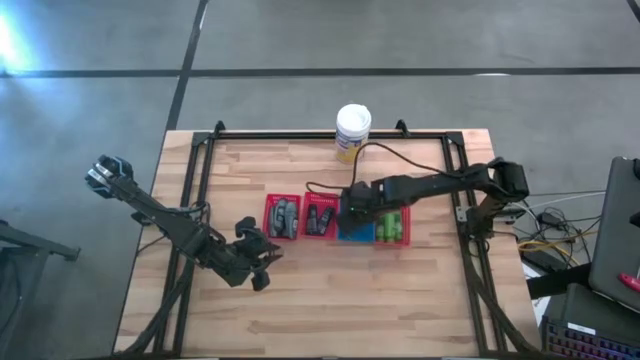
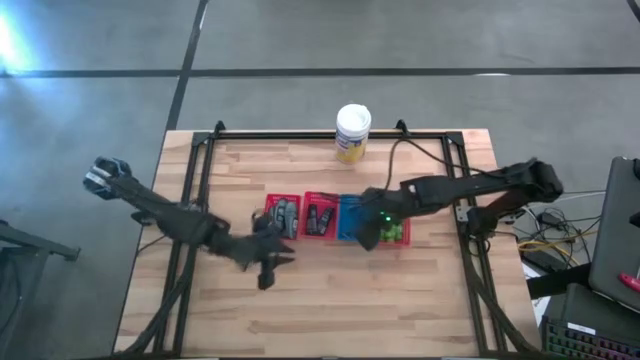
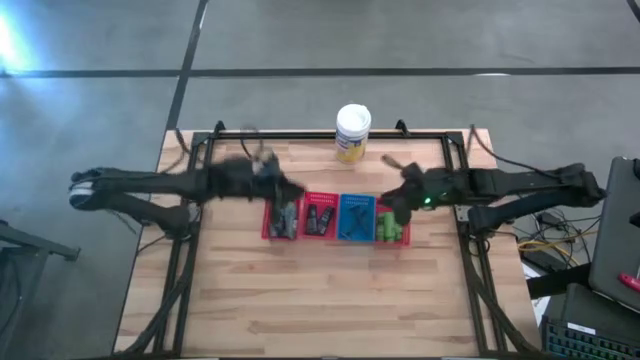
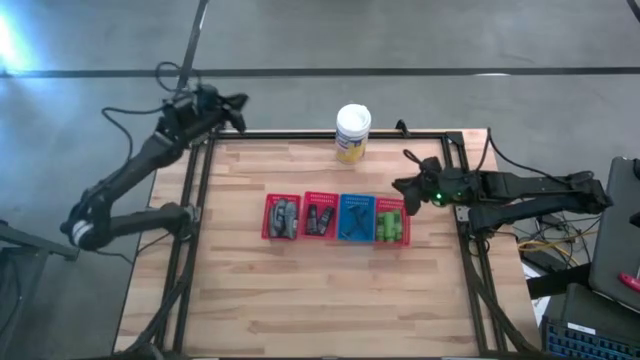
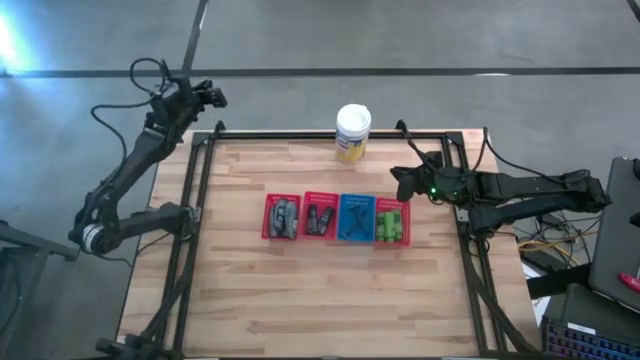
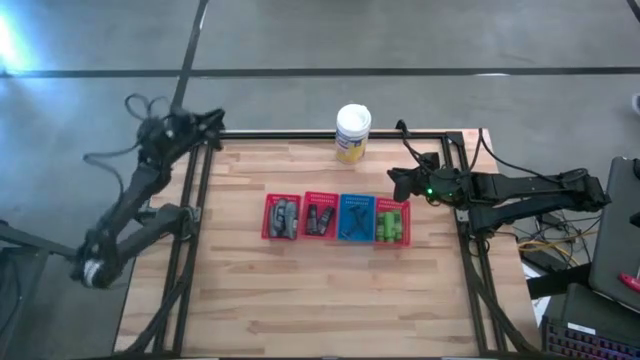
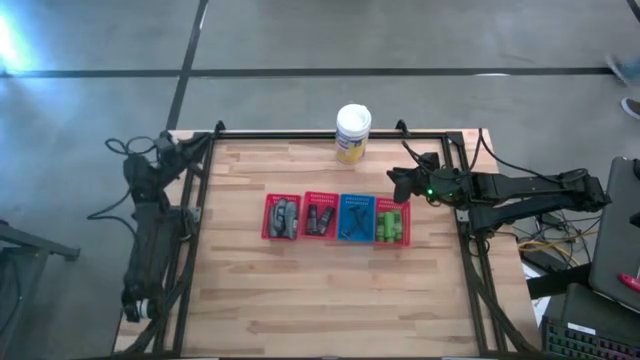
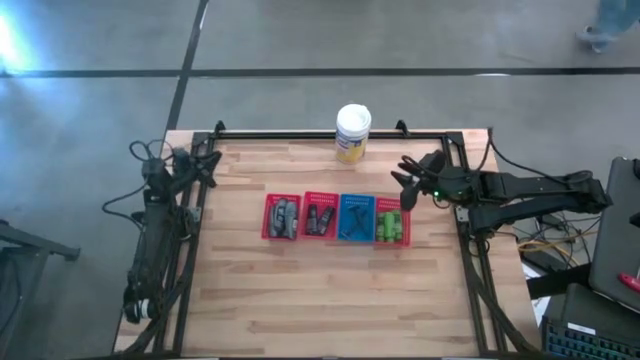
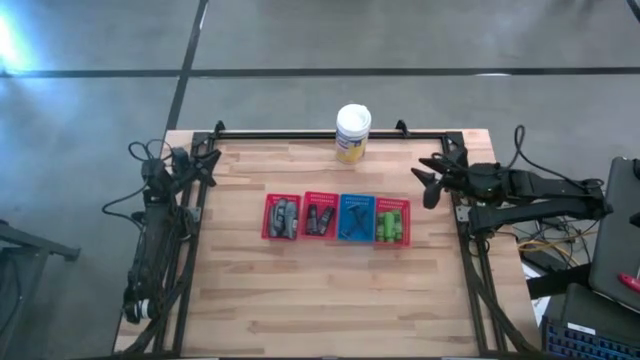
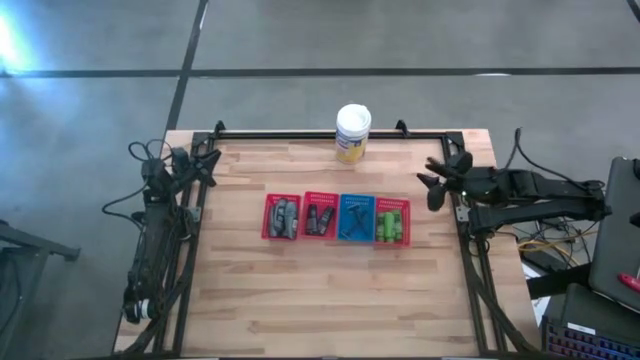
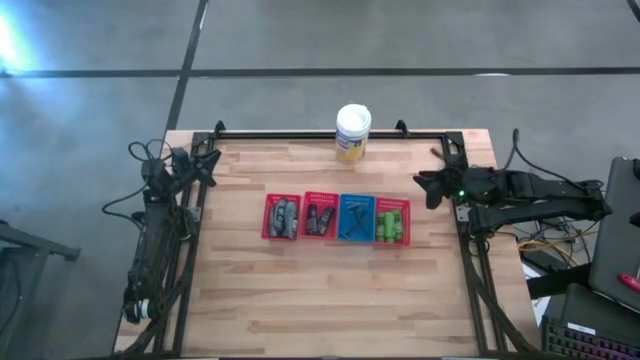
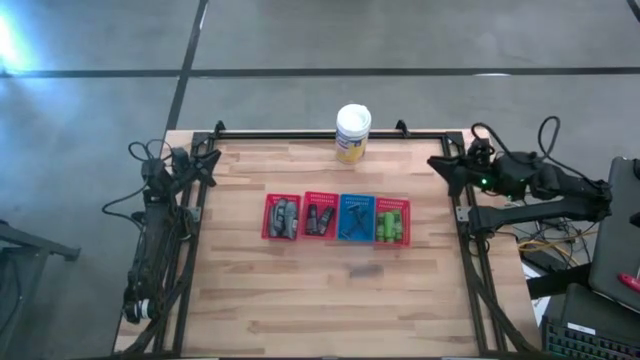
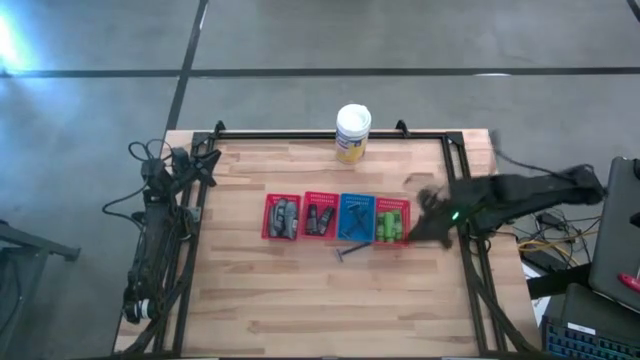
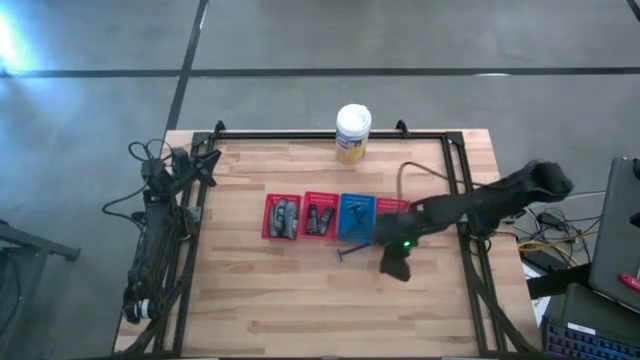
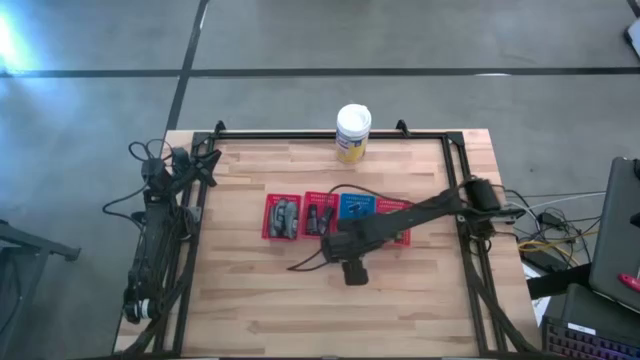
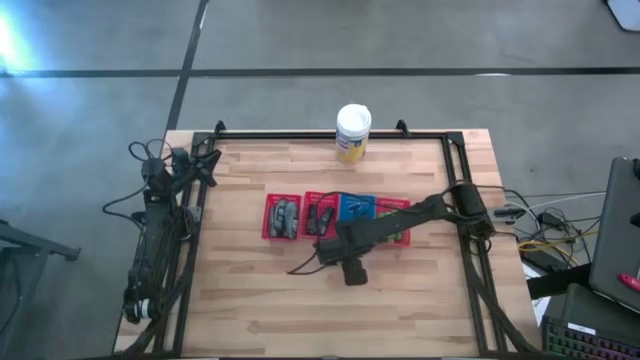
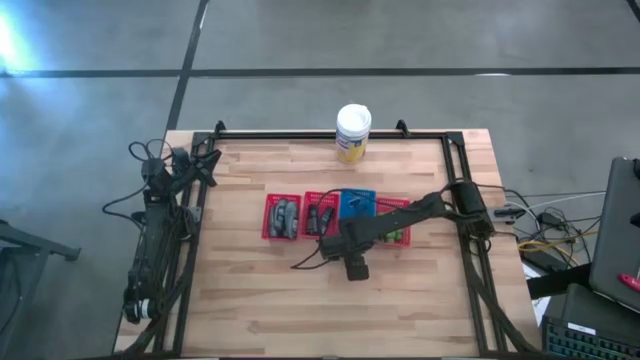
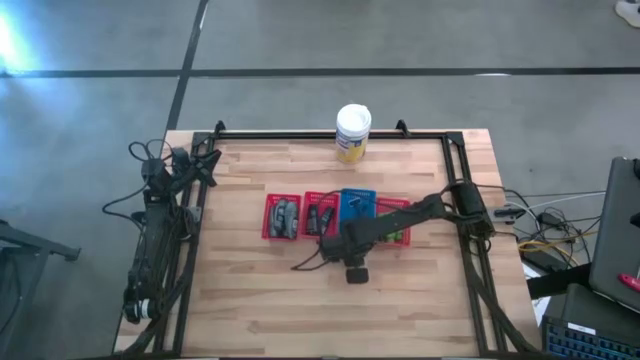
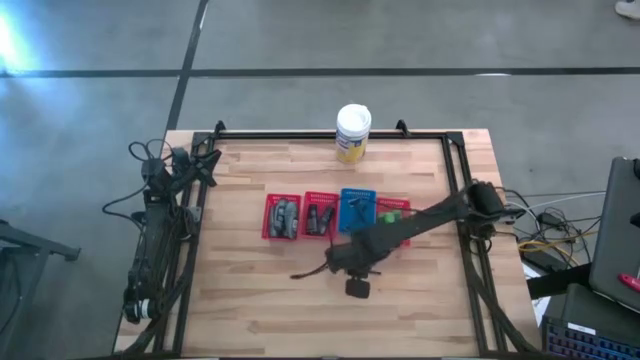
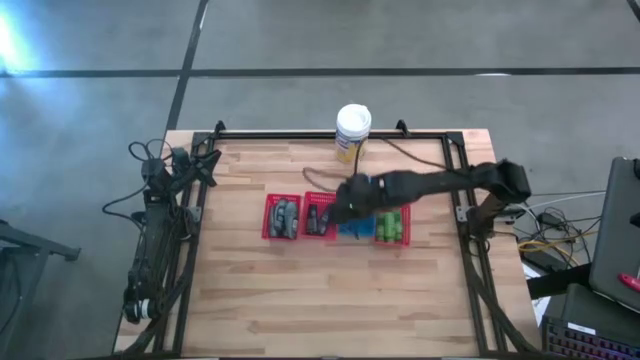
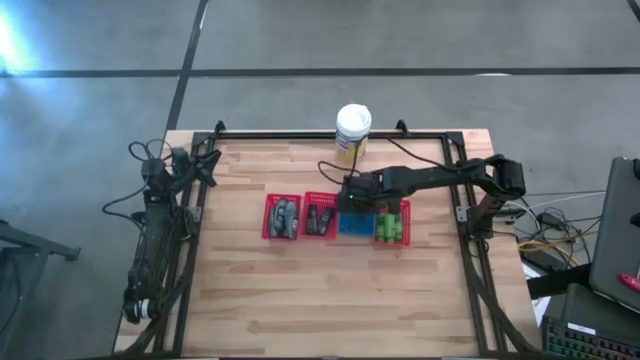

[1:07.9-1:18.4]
Task: Pick & Place Travel size toiletries
Put the blue razor into the blue bin

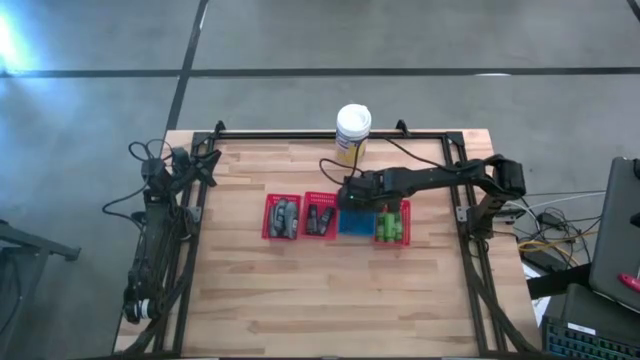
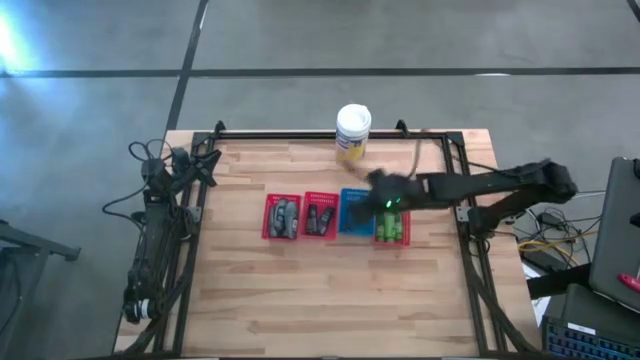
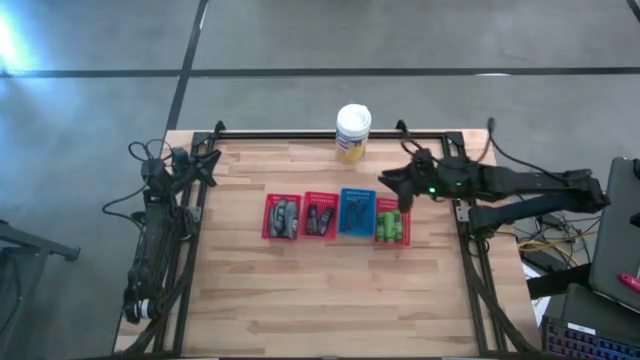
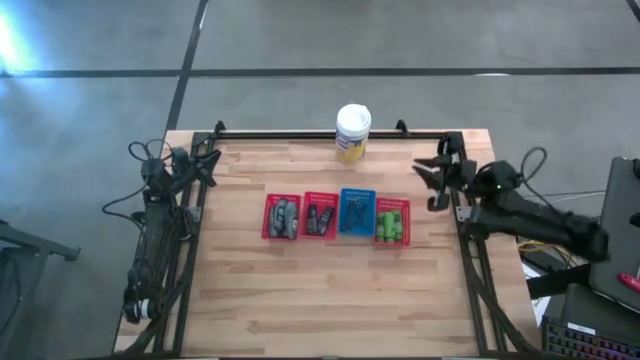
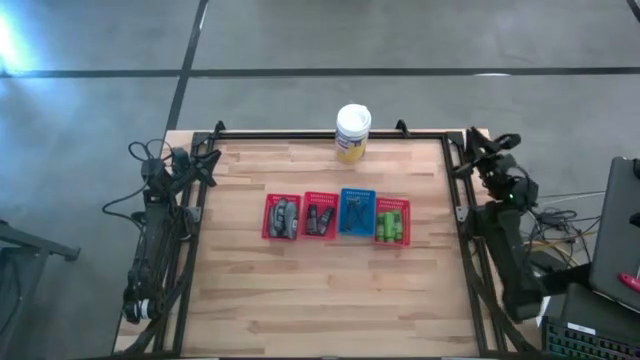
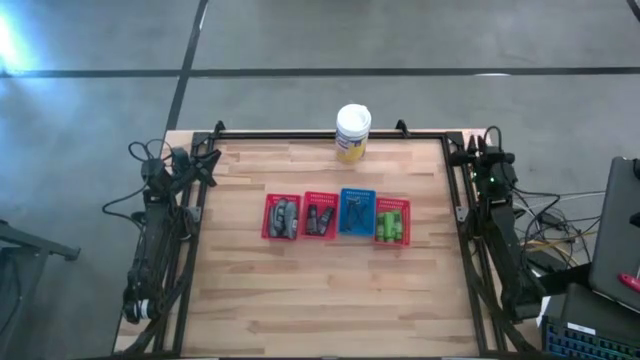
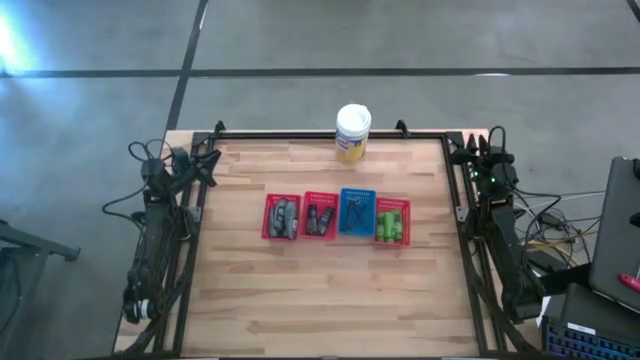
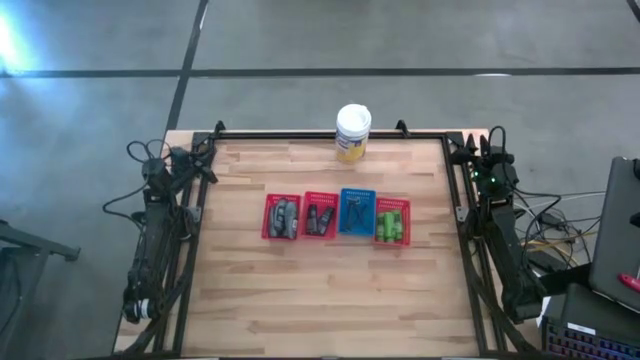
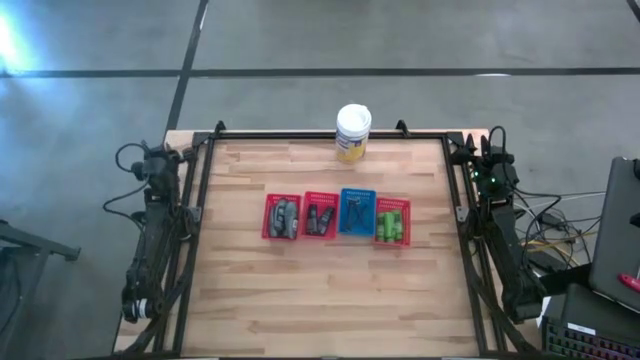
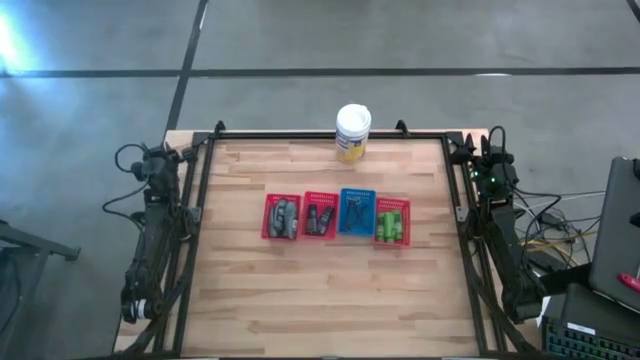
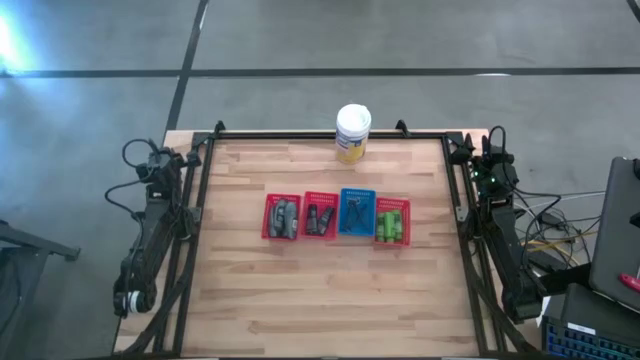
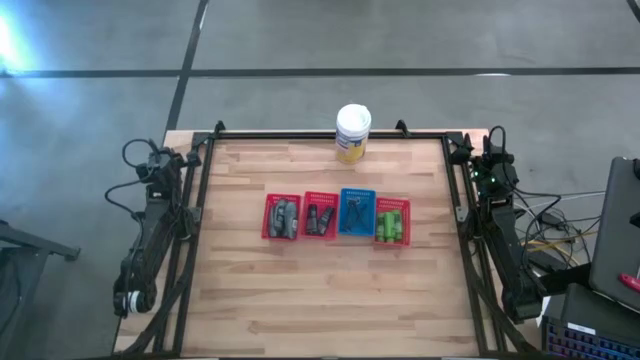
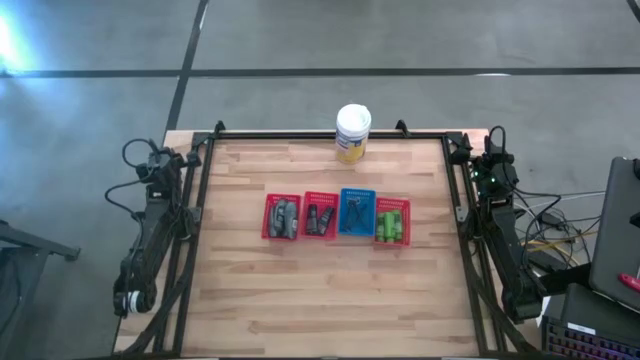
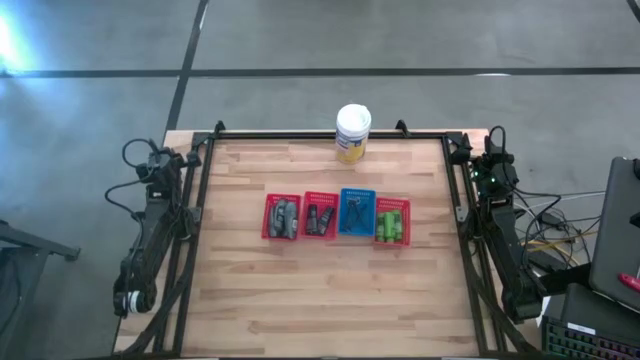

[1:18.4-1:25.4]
Return to Home Position

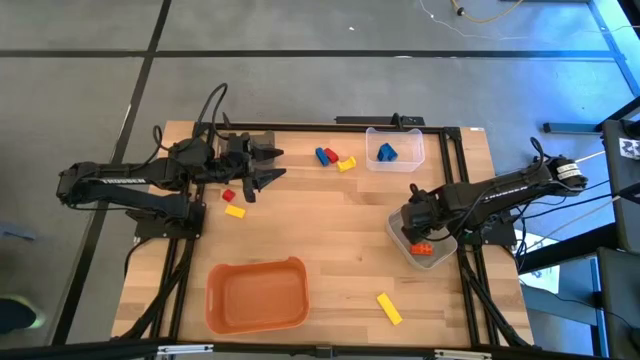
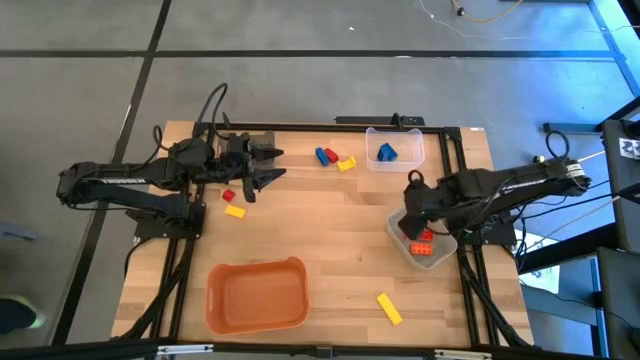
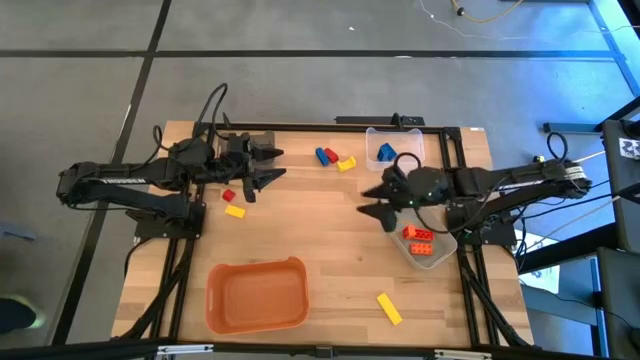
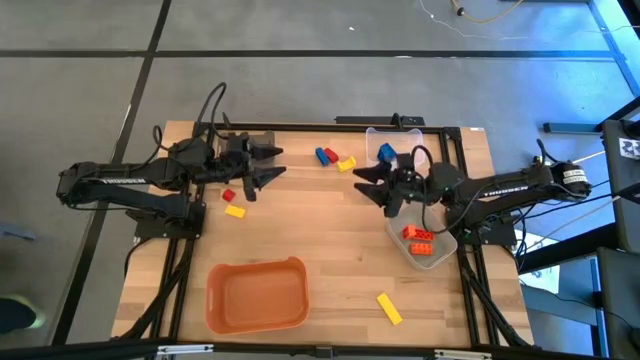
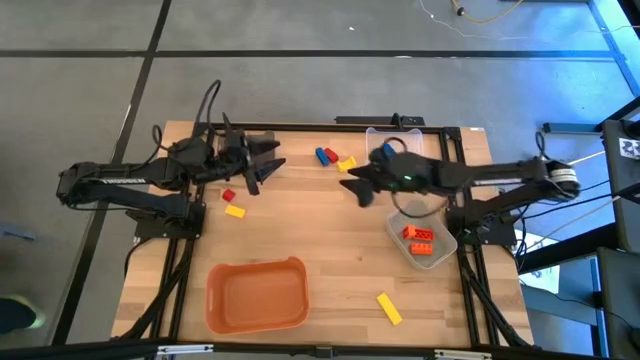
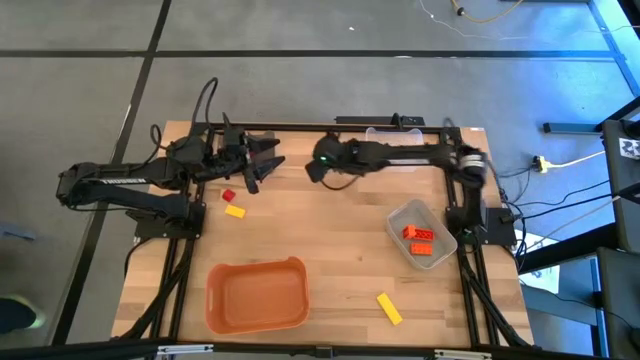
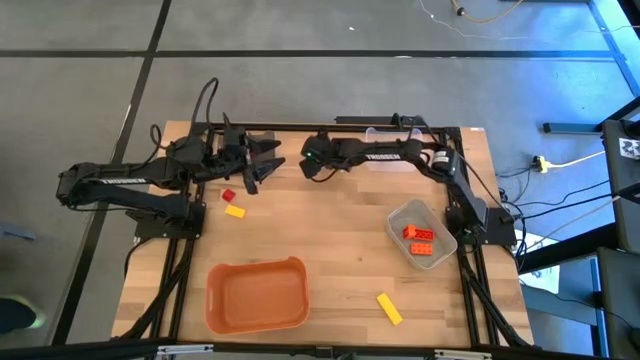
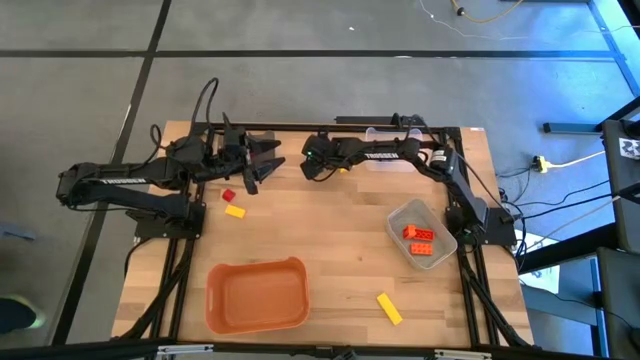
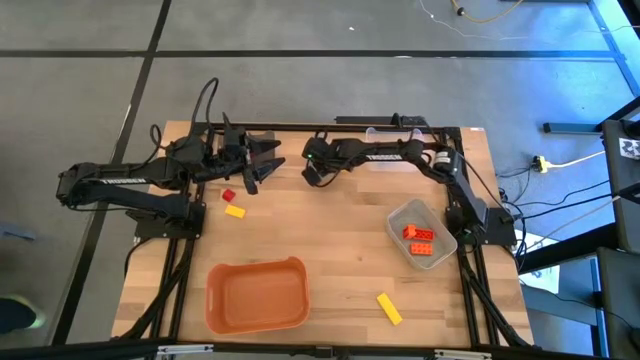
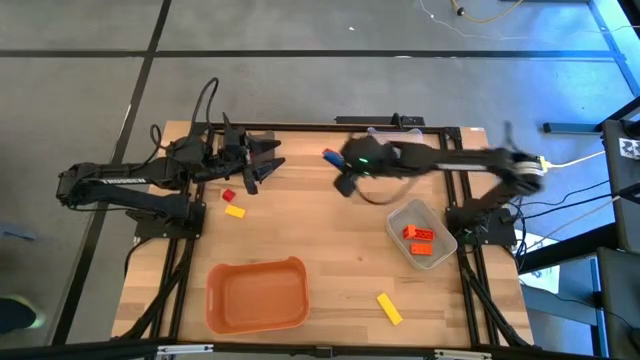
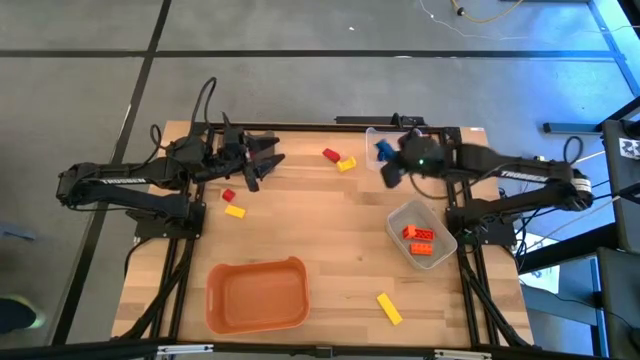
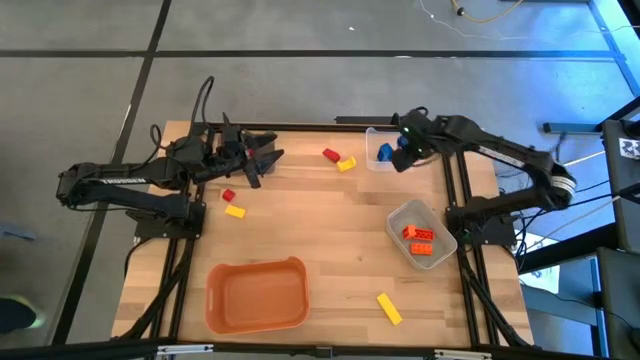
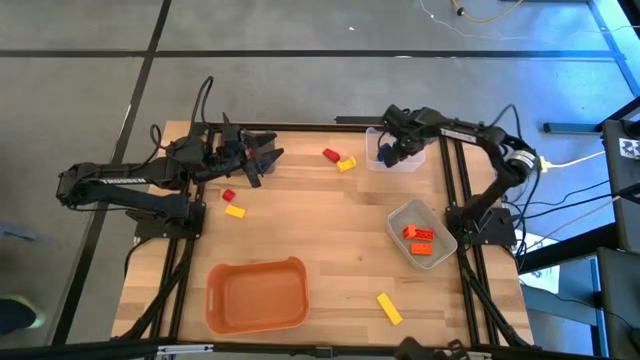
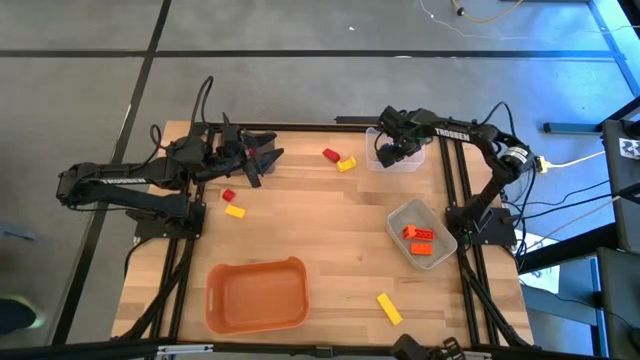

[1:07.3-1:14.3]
Task: Sort & place blocks by color
Put the blue game piece into the transparent bin
